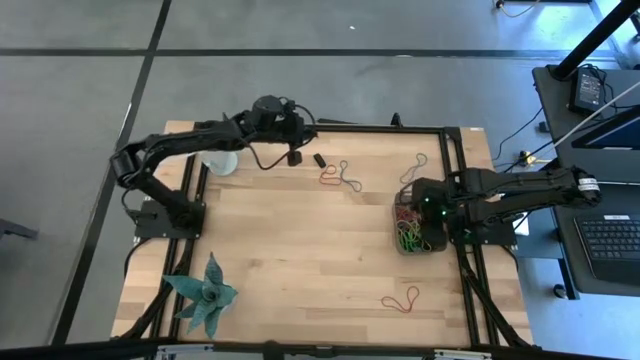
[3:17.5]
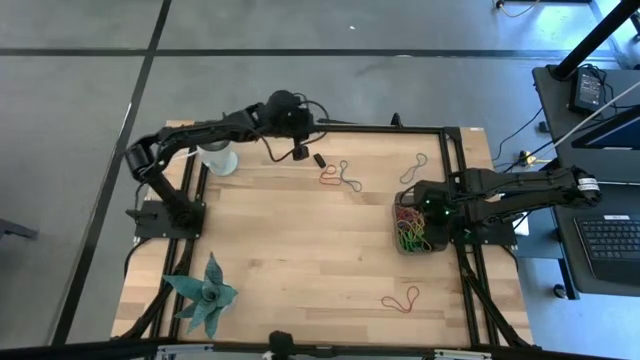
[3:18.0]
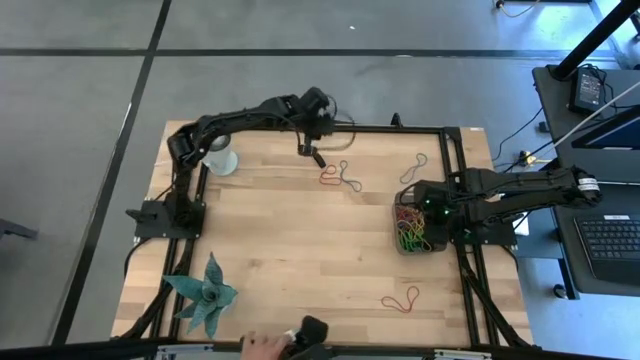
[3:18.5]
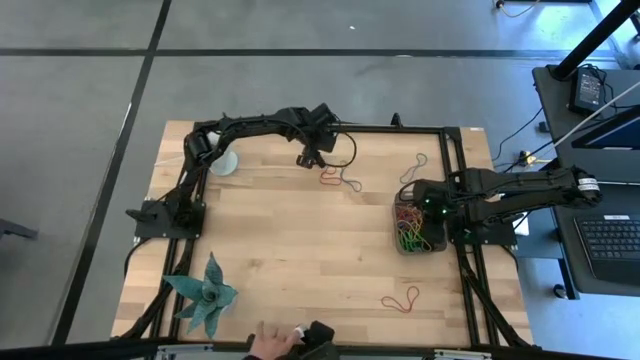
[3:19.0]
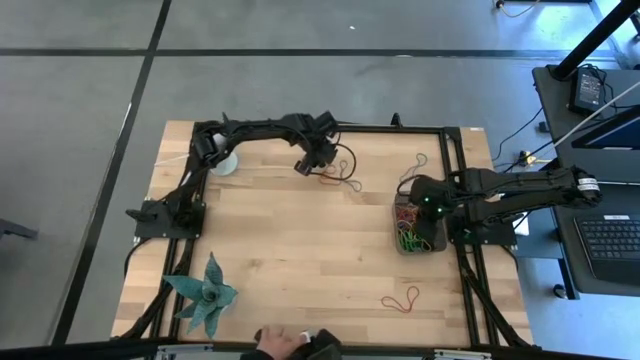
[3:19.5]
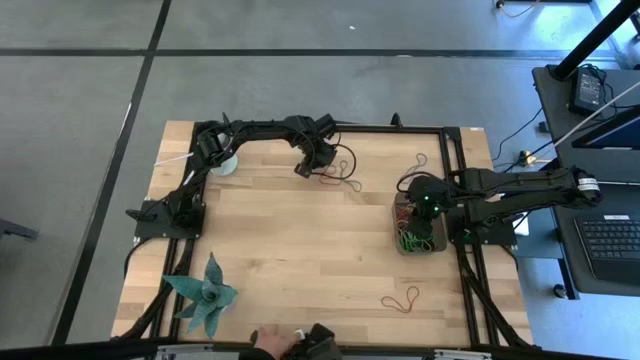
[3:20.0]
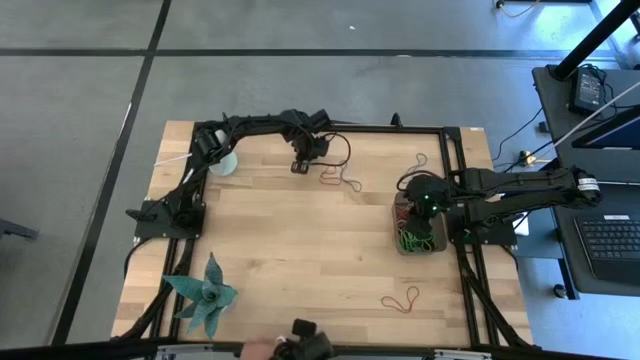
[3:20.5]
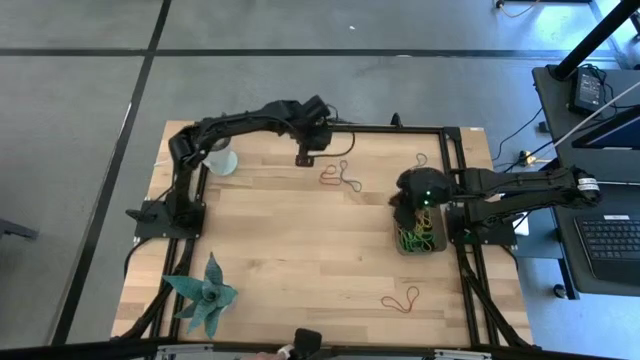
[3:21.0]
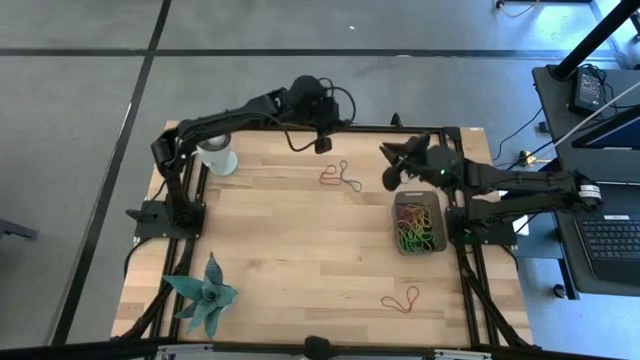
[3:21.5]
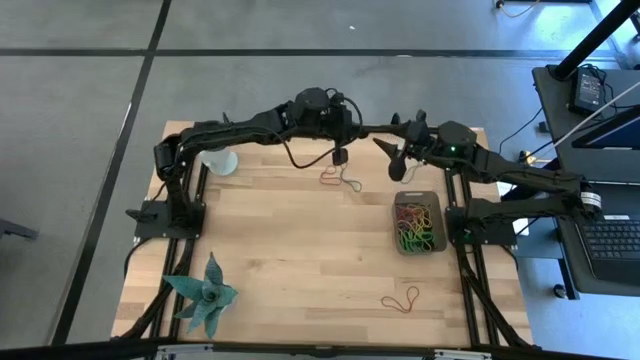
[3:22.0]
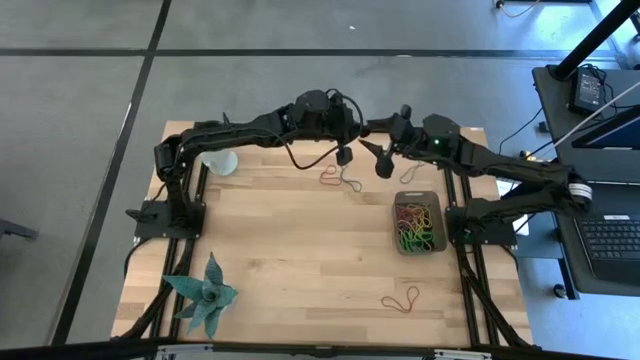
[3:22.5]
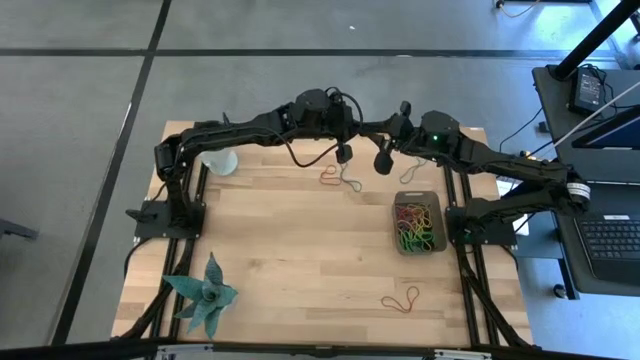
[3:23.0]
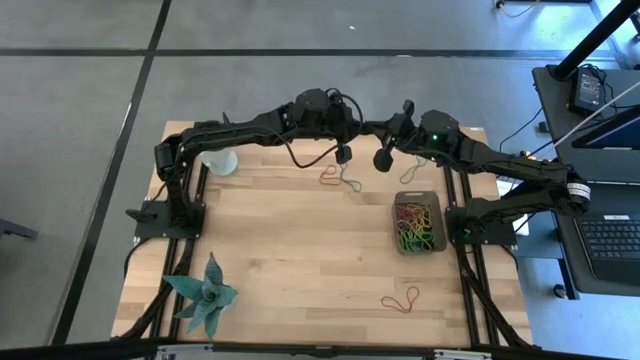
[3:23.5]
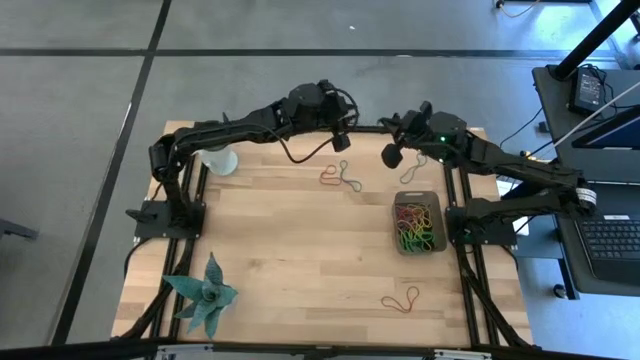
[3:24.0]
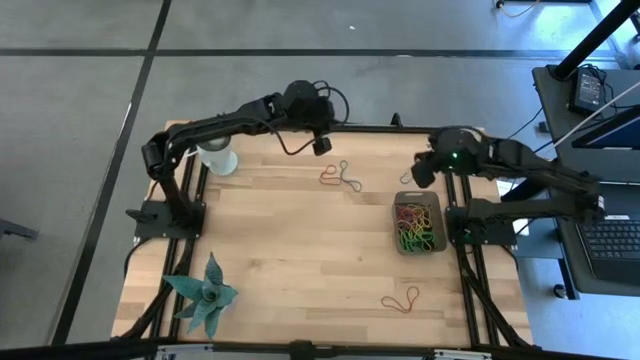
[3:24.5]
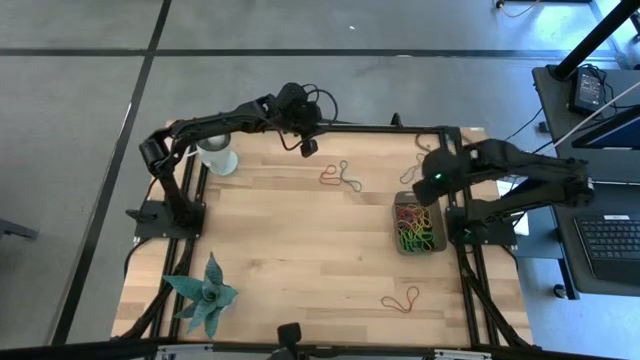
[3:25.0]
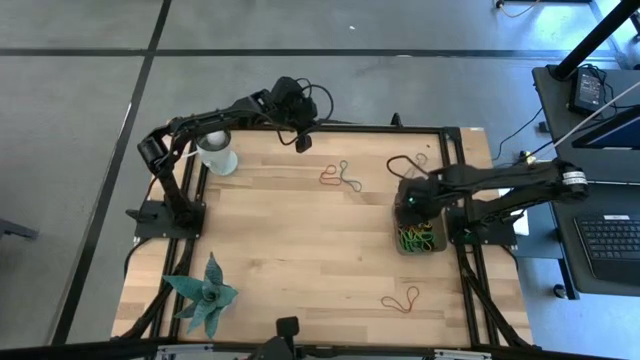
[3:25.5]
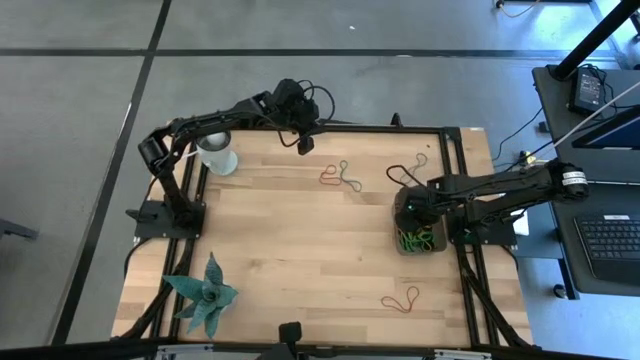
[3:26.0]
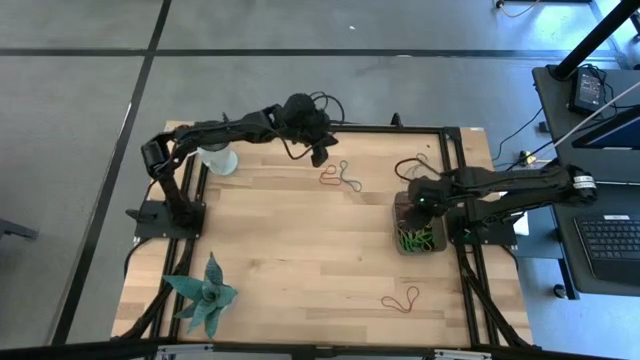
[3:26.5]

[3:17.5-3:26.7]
Task: Pick and place rubber bands into bin
Put the black rubber band into the black bin

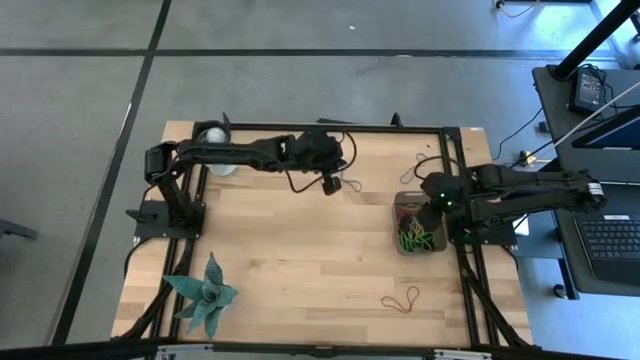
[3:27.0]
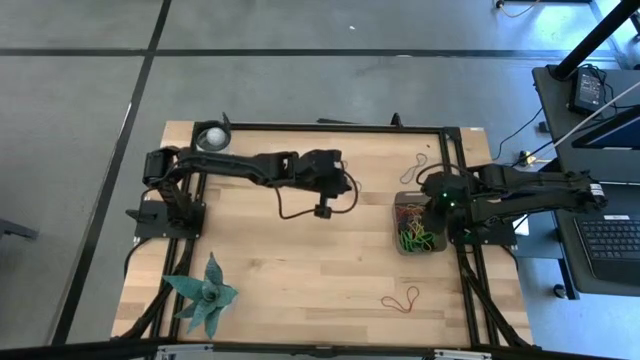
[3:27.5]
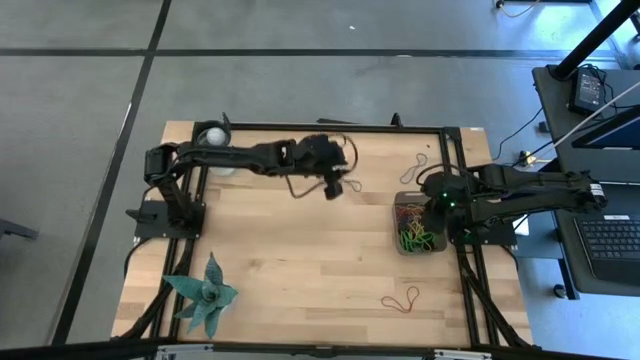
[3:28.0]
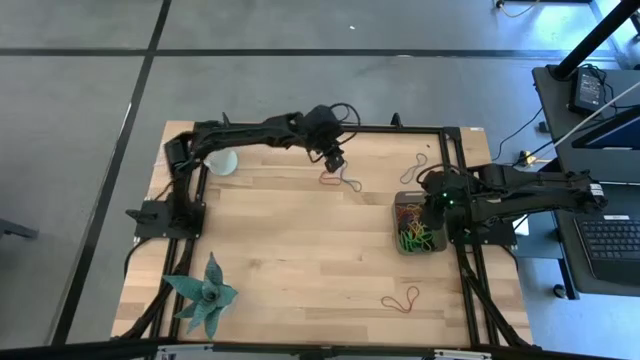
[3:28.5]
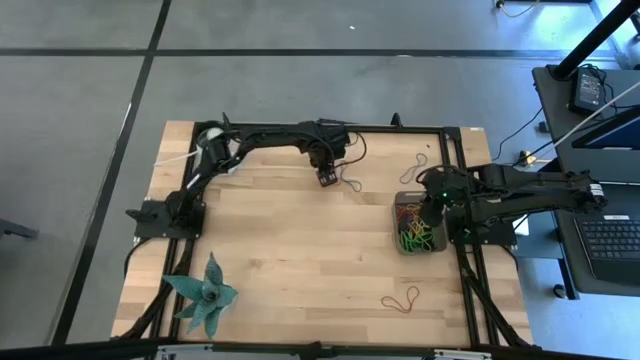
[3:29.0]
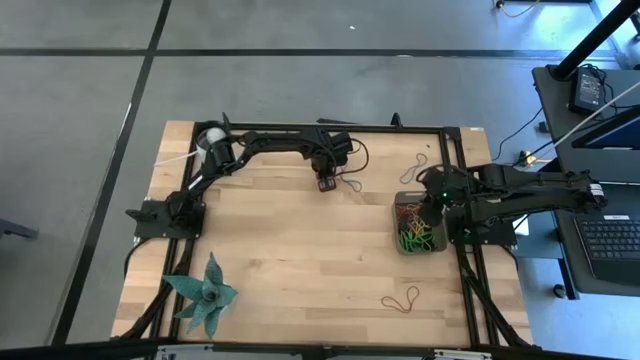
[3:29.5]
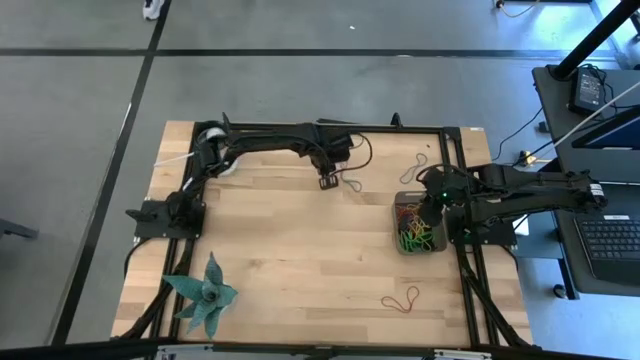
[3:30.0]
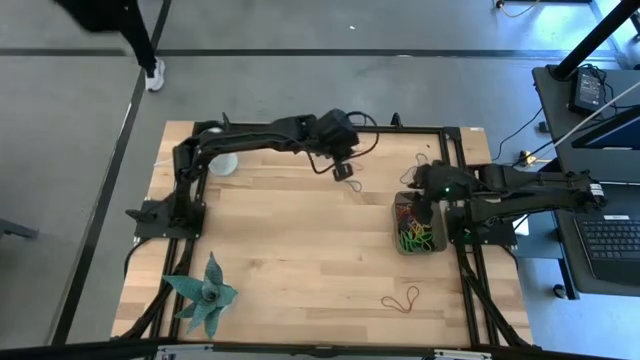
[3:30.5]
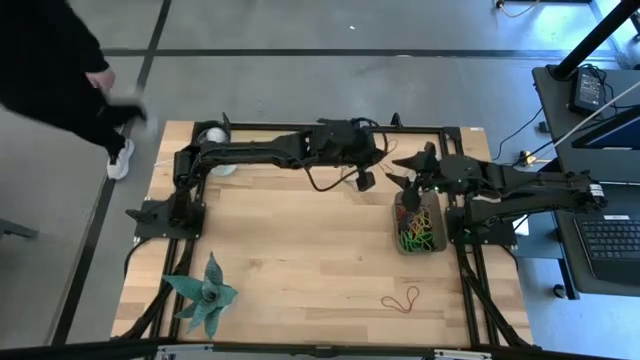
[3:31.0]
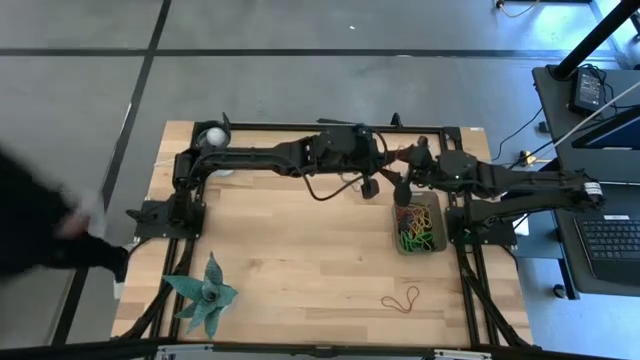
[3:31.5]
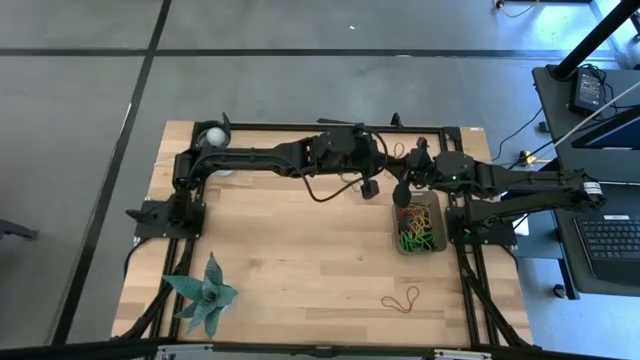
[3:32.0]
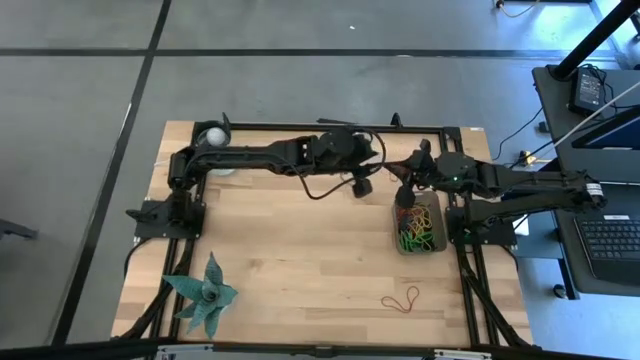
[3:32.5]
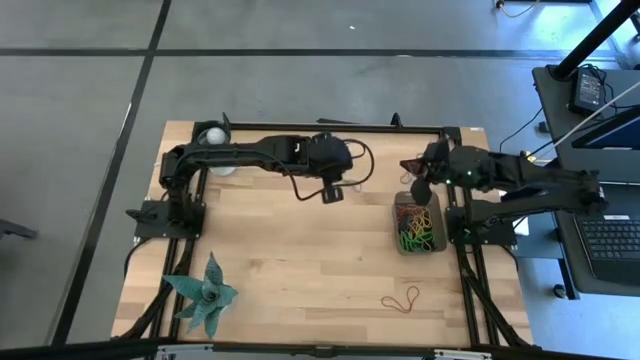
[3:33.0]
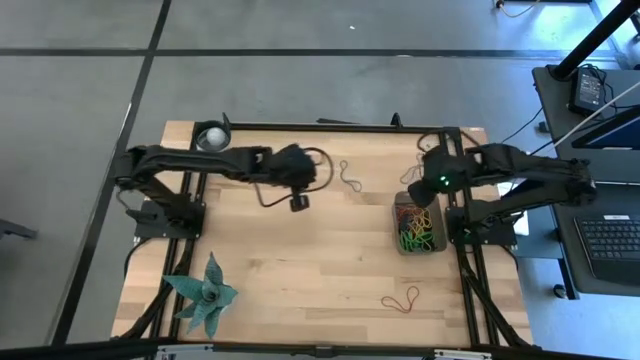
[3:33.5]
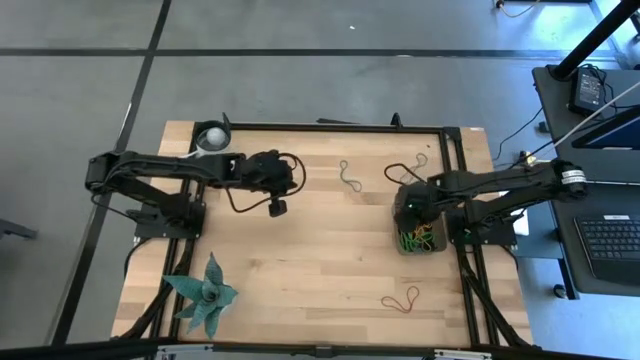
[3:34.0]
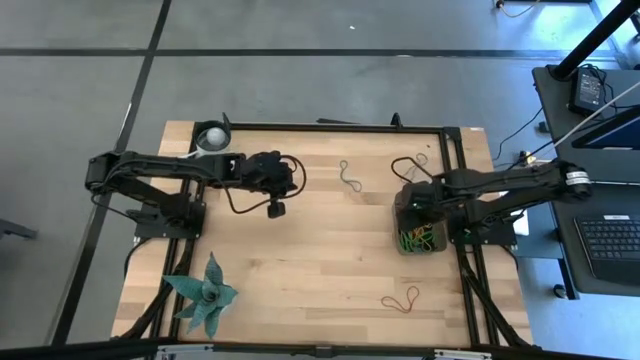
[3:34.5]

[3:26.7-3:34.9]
Put the red rubber band into the black bin

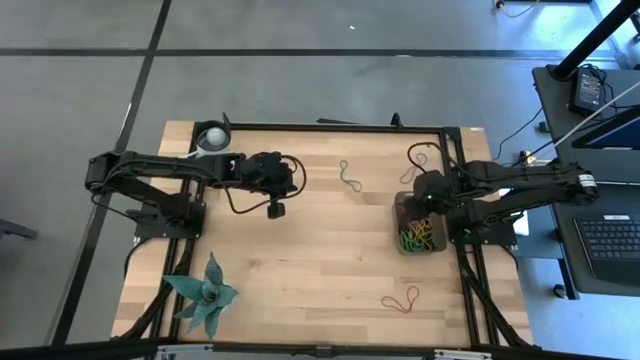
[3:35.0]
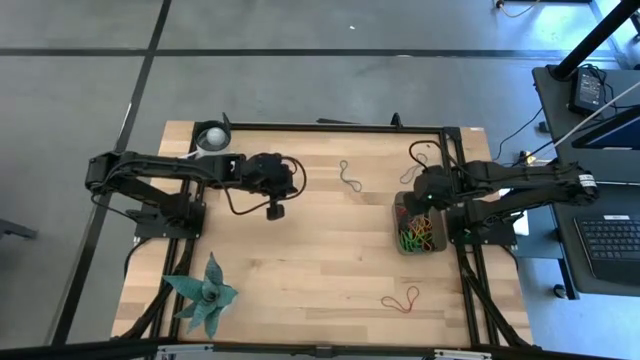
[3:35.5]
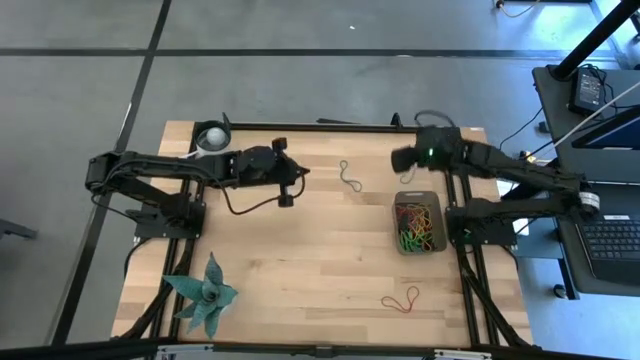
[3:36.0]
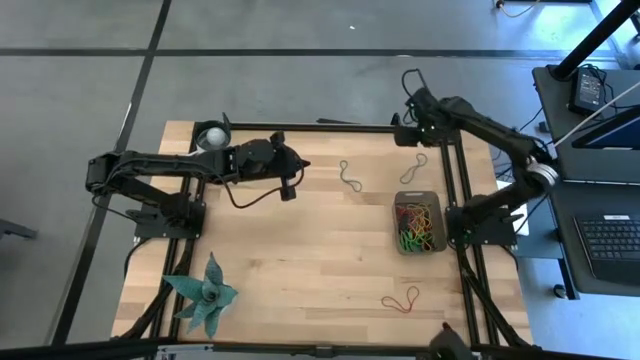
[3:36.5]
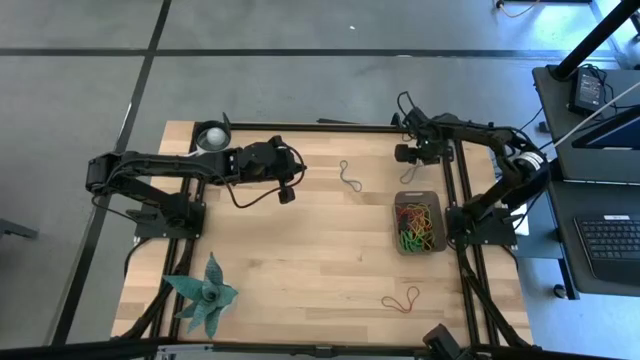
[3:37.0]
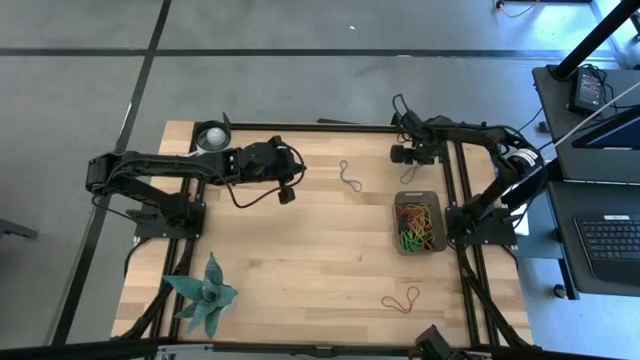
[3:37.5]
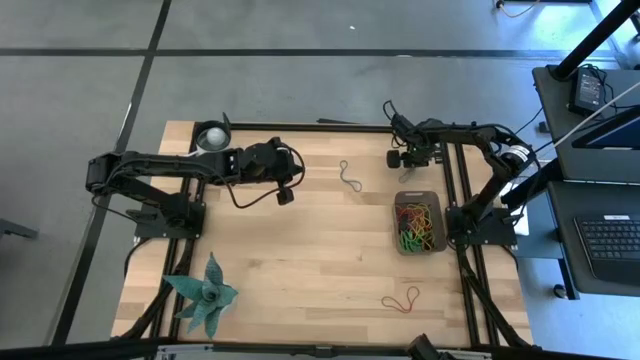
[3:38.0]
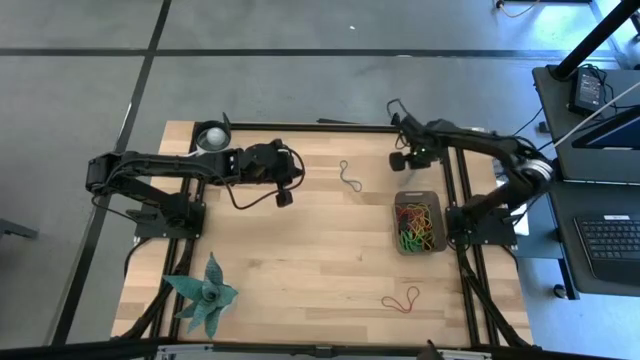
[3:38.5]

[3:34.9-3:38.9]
Put the blue rubber band into the black bin
